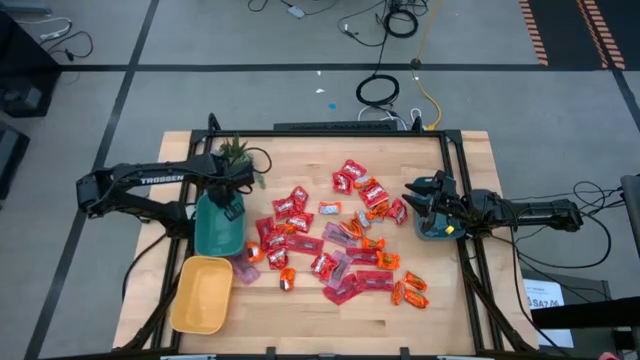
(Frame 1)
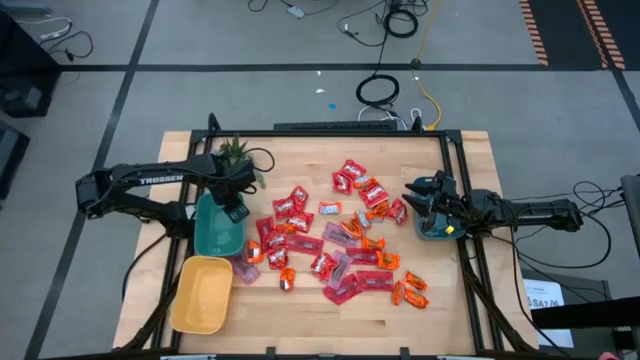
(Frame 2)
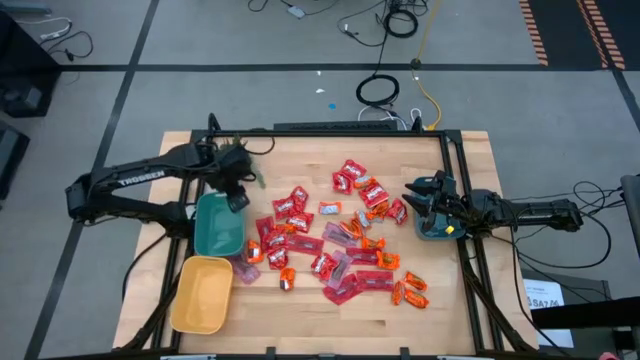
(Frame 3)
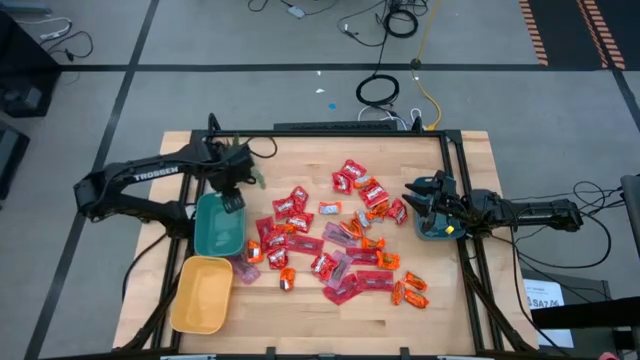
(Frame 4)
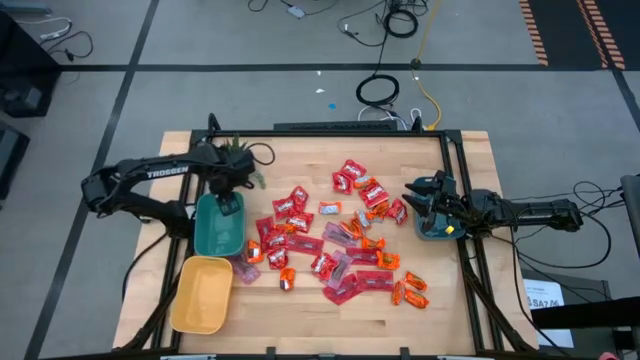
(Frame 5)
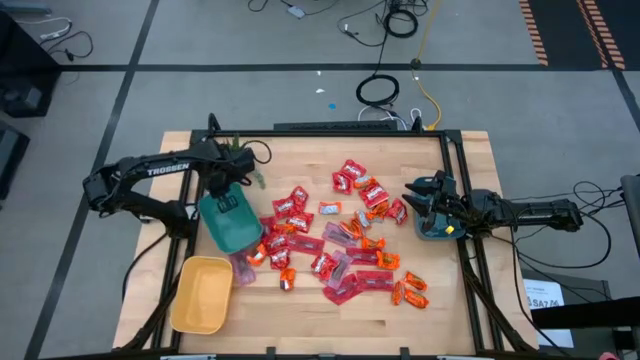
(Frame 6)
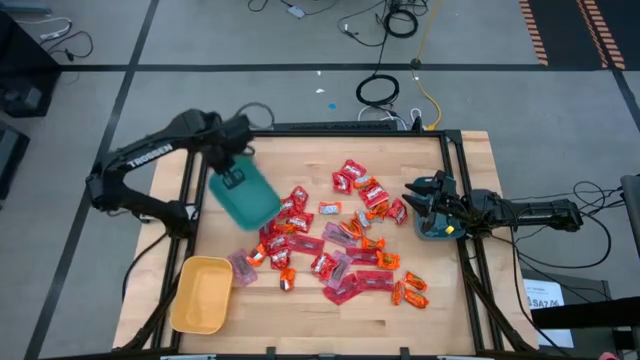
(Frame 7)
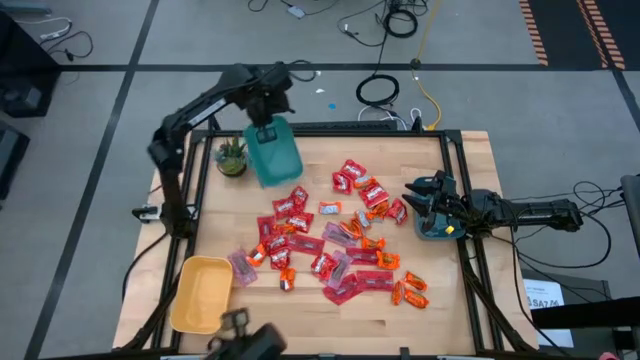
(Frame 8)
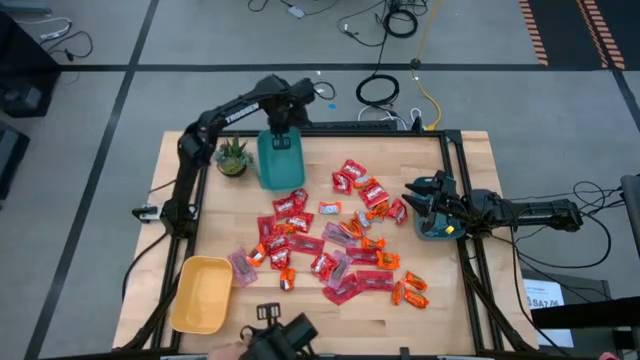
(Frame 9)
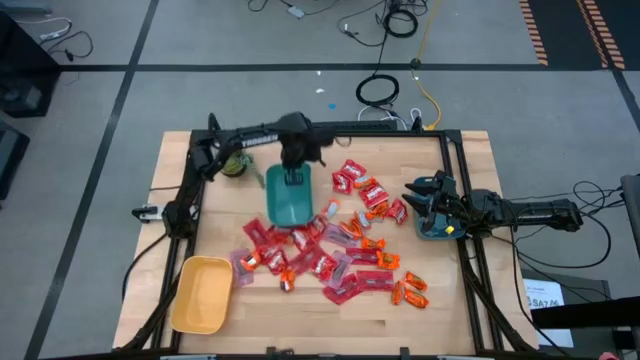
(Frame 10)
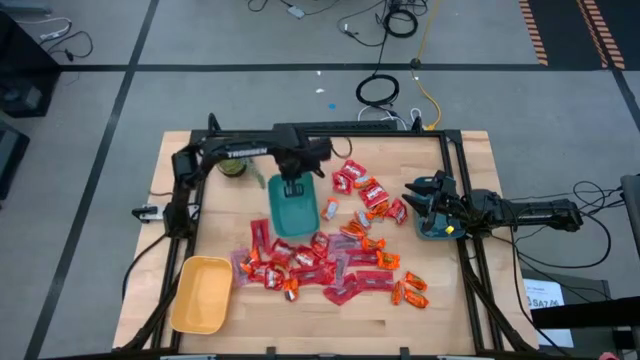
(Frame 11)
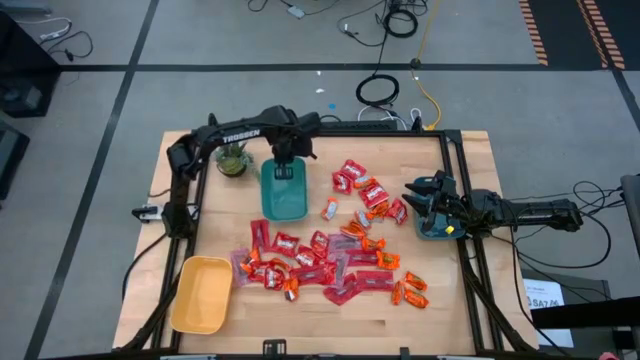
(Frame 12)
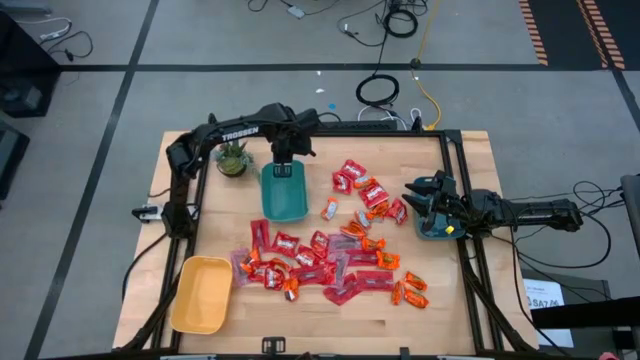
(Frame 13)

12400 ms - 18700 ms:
Task: Sort candy
Move the green bin to the upper middle

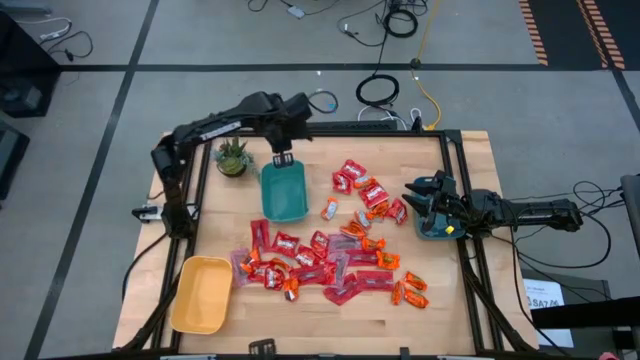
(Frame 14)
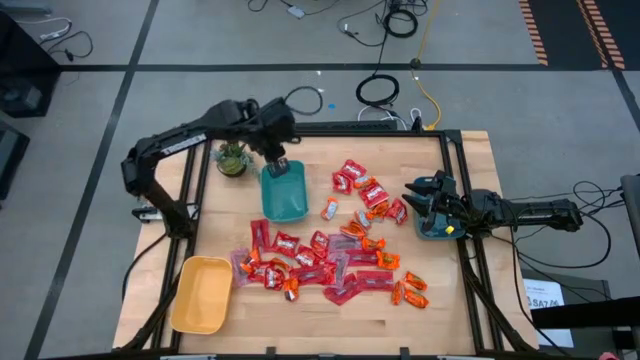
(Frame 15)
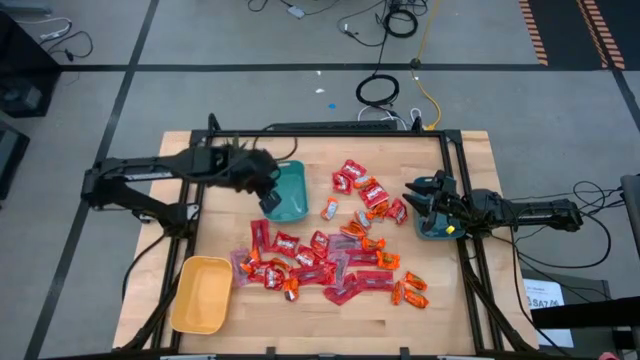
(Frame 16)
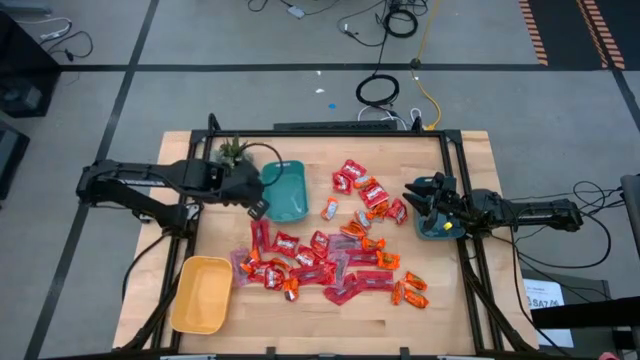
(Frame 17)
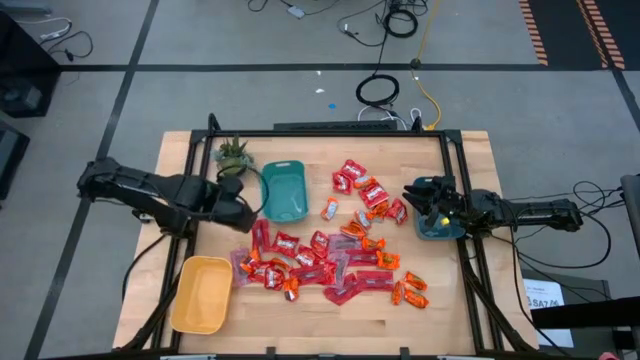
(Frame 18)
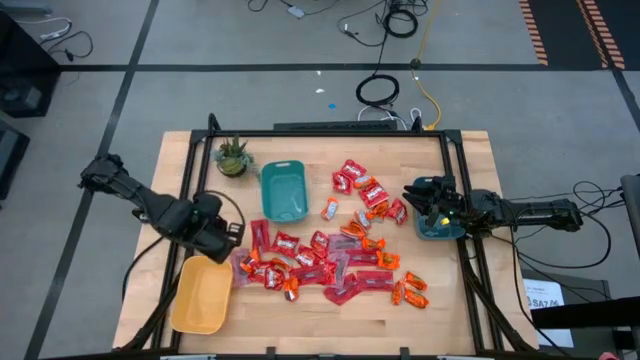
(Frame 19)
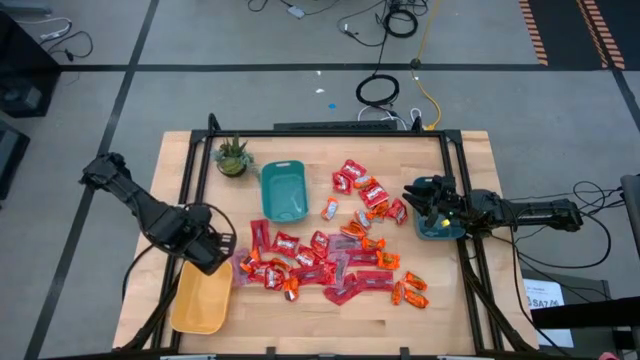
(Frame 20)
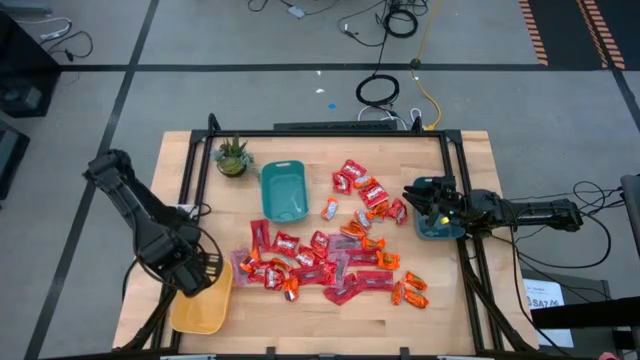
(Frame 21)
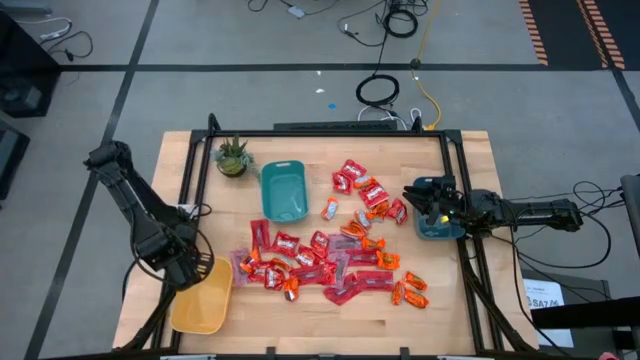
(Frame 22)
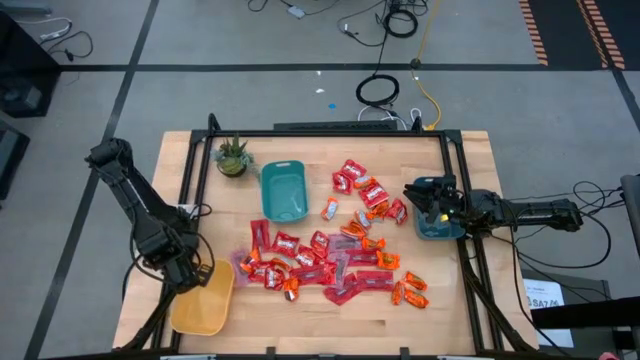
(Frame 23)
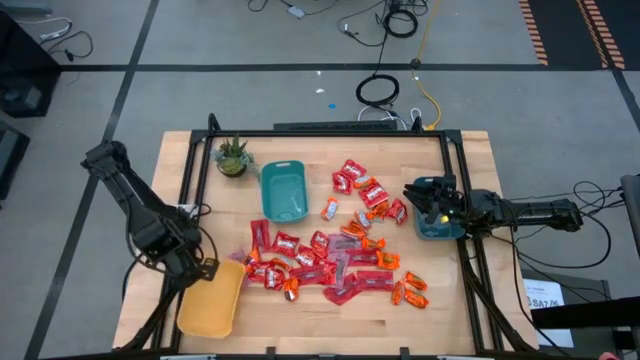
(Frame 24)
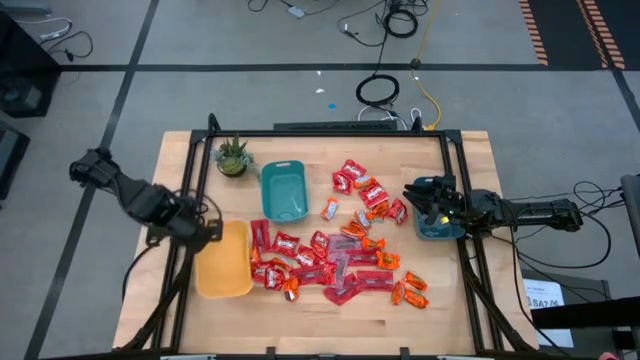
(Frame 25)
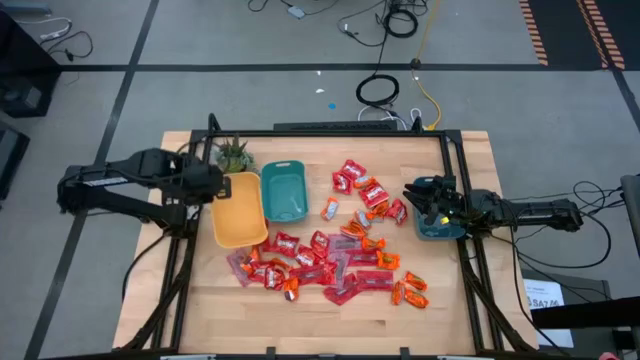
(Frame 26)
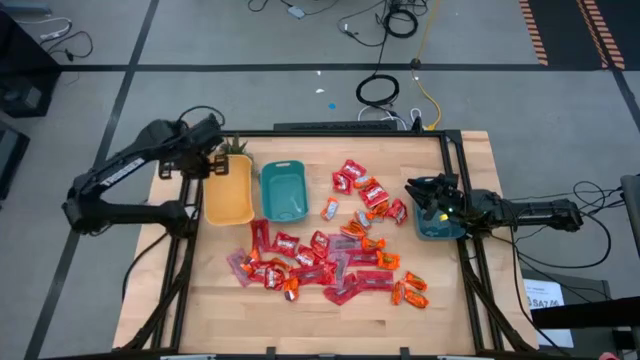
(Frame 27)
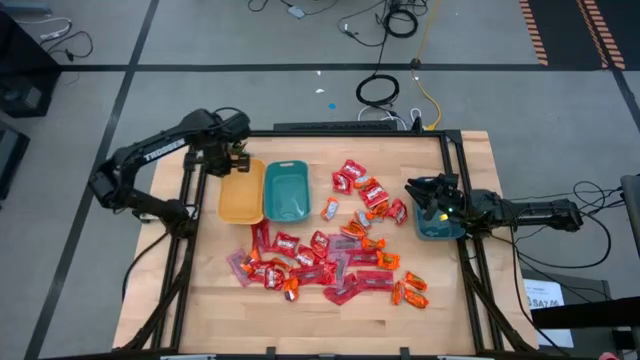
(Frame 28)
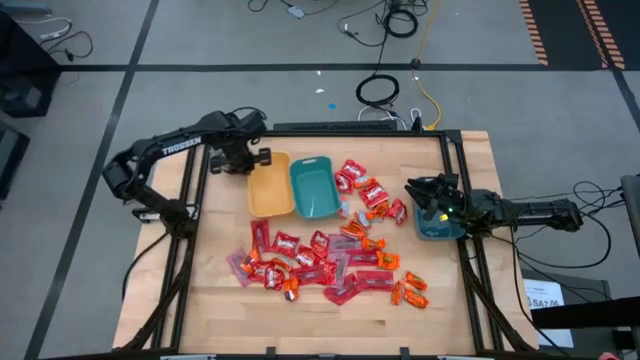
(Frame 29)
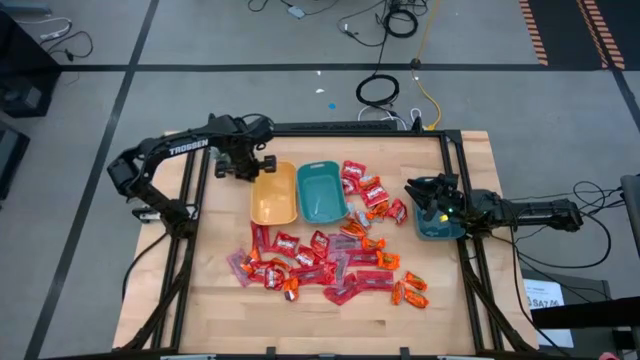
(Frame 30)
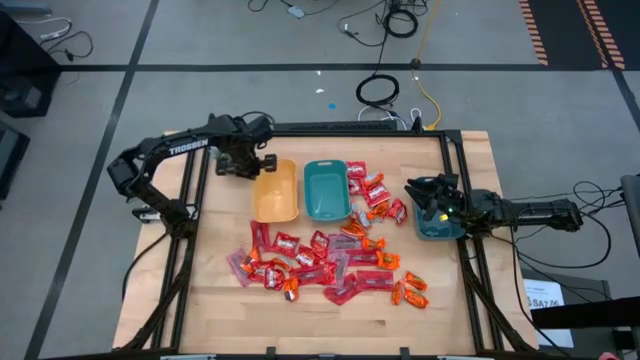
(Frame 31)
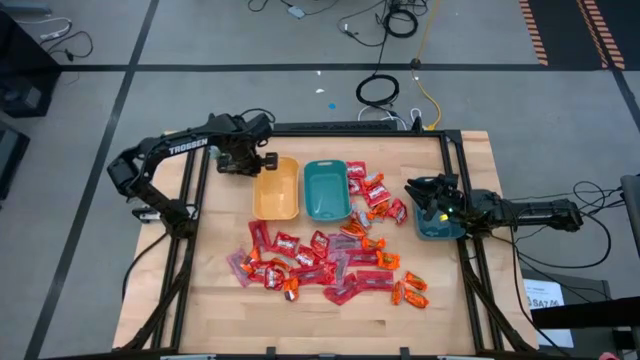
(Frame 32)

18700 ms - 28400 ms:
Move the orange bin to the upper middle

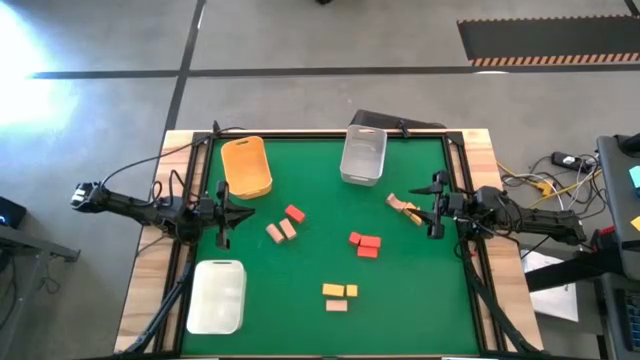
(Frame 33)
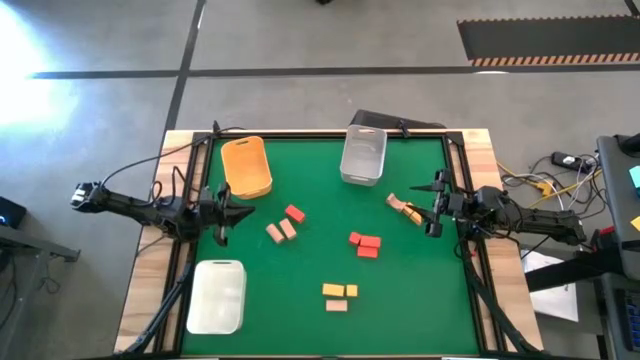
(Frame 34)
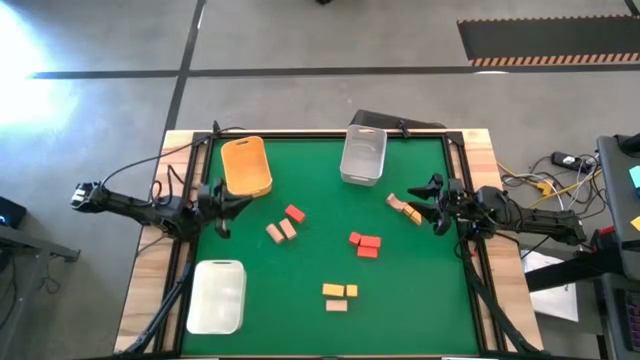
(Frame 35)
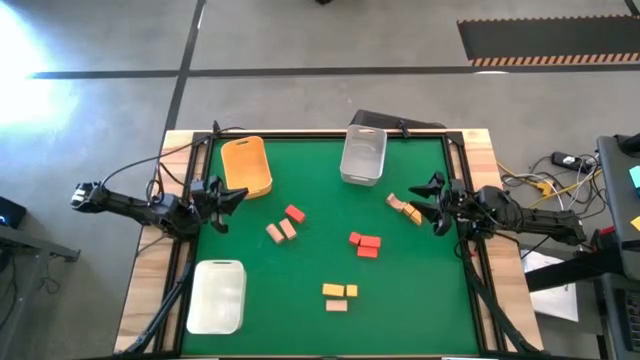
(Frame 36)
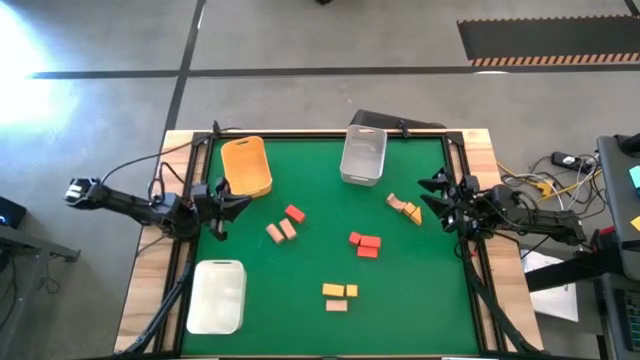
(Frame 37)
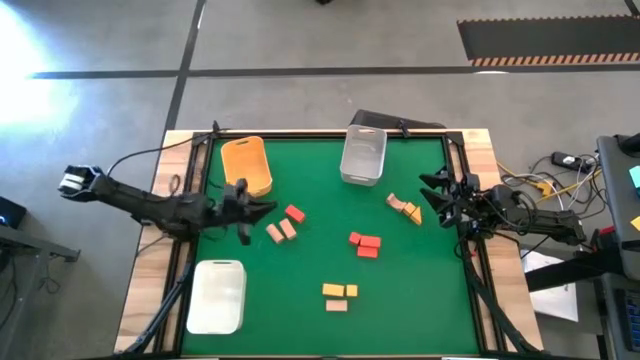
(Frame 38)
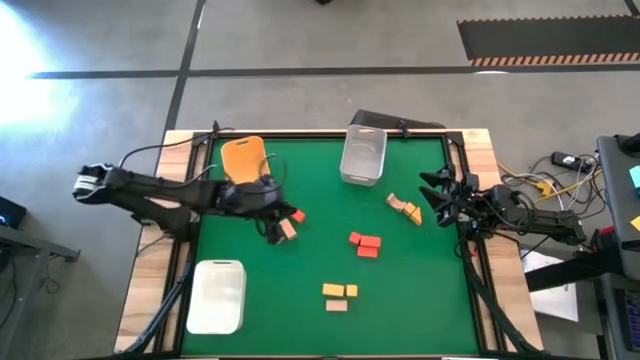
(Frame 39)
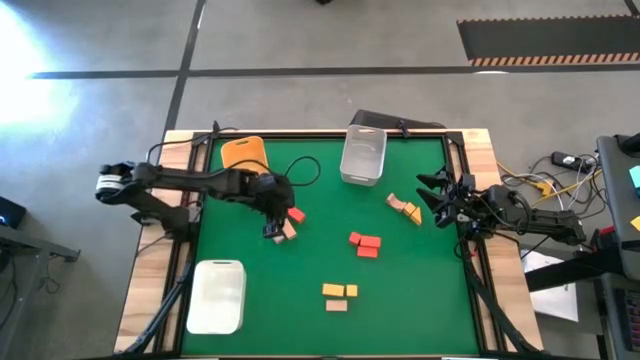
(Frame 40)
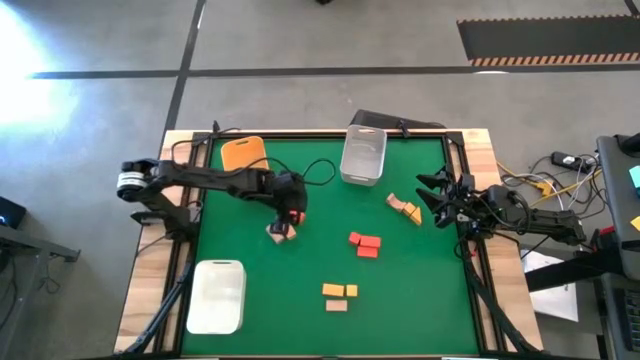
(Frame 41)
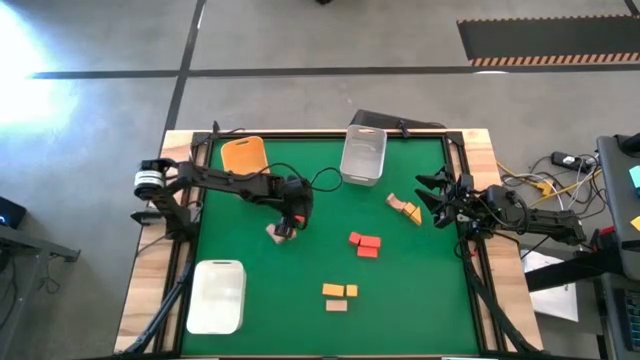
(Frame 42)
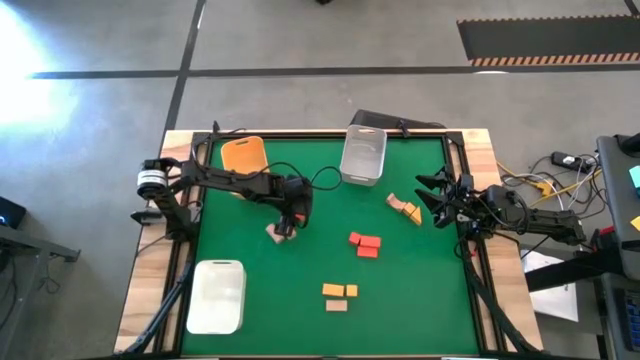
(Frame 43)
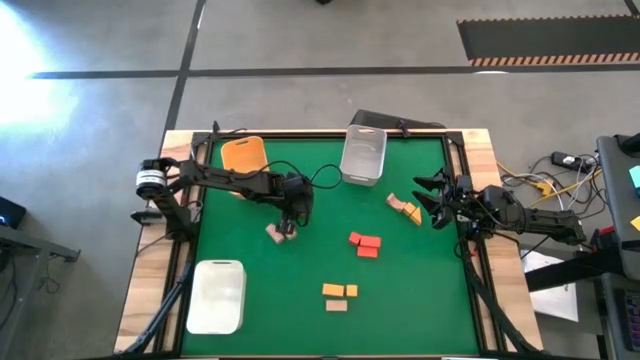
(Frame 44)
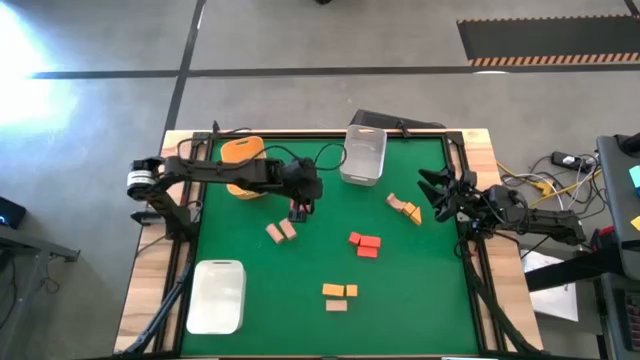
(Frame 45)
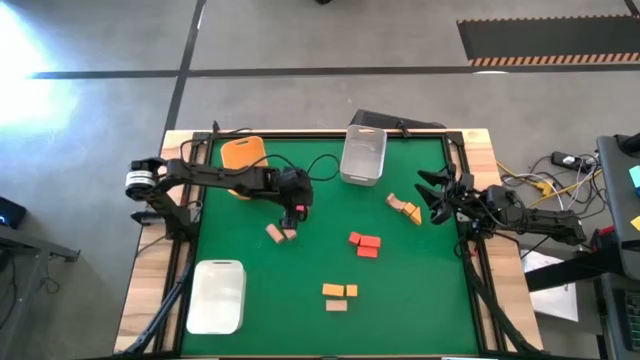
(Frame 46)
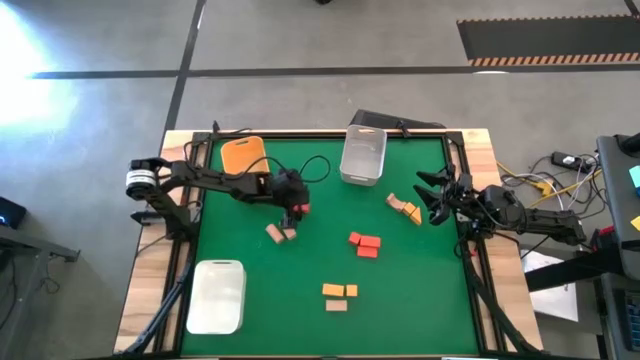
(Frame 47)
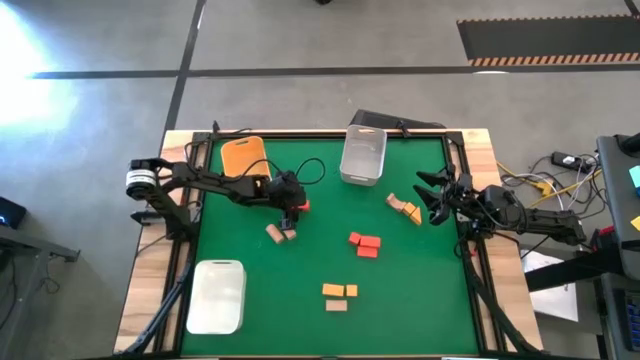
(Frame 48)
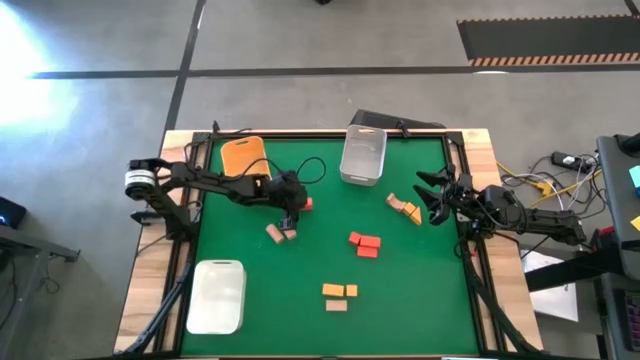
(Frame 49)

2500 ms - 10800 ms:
Task: Sort & place blocks by color
Put the orange block into the white bin
